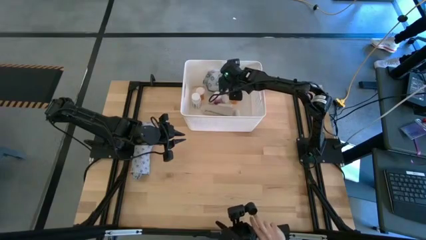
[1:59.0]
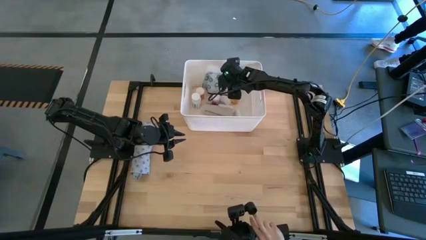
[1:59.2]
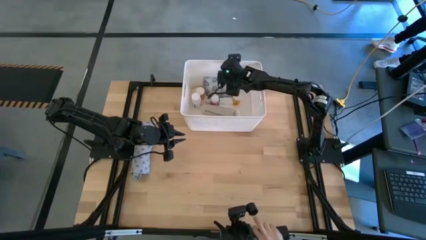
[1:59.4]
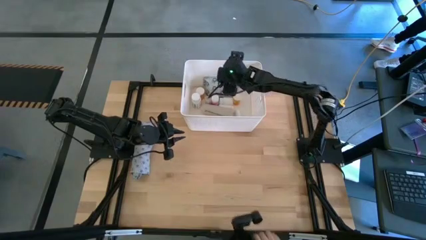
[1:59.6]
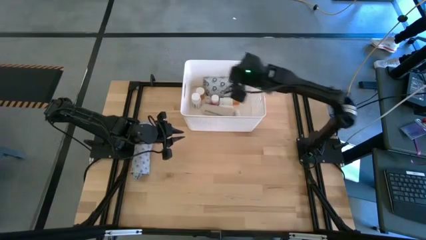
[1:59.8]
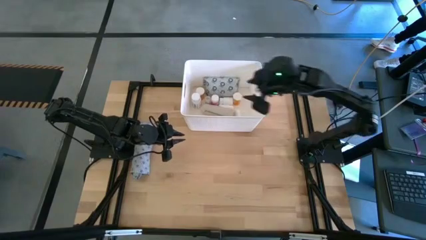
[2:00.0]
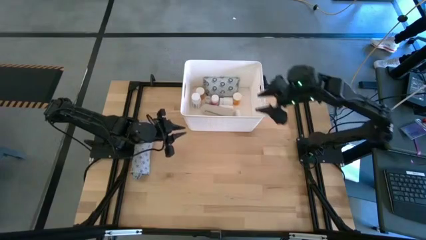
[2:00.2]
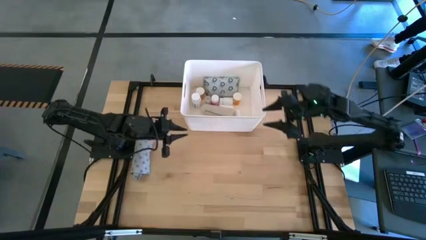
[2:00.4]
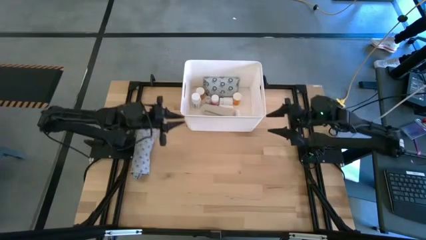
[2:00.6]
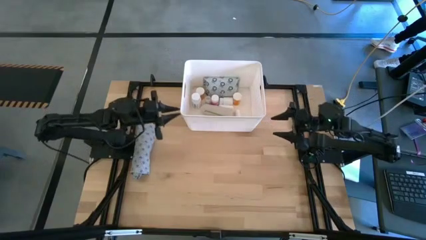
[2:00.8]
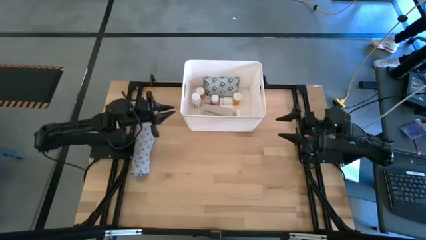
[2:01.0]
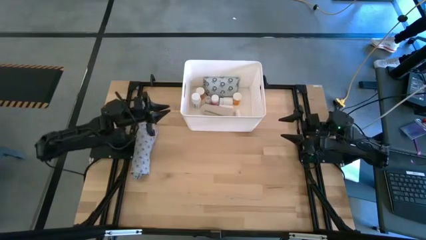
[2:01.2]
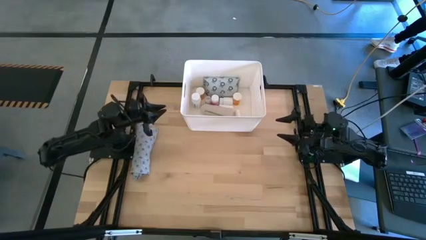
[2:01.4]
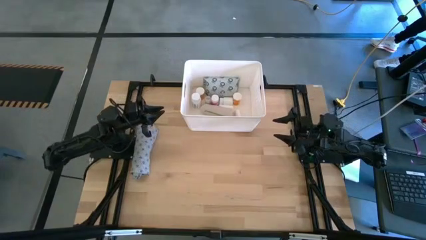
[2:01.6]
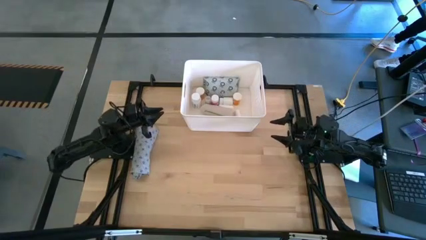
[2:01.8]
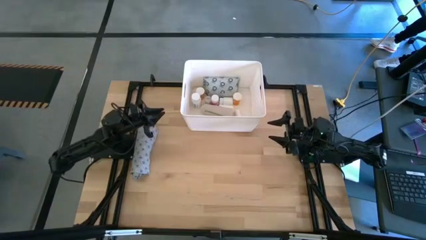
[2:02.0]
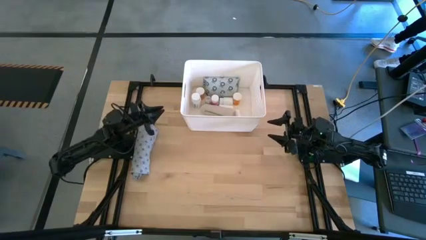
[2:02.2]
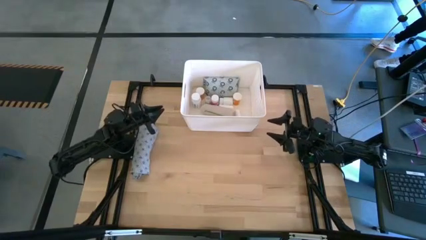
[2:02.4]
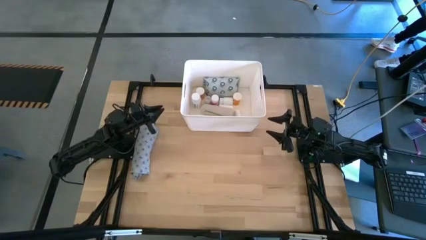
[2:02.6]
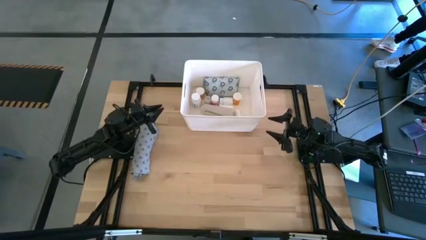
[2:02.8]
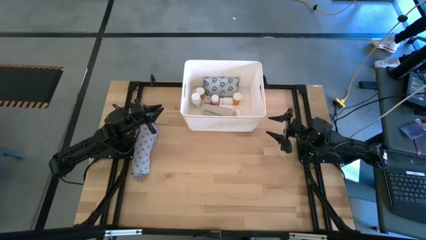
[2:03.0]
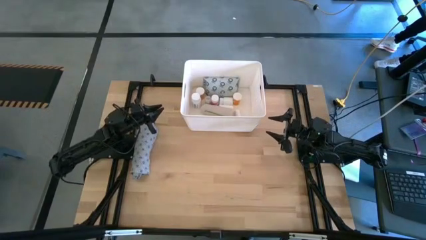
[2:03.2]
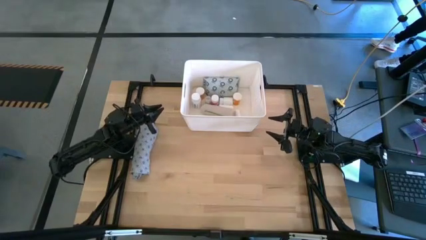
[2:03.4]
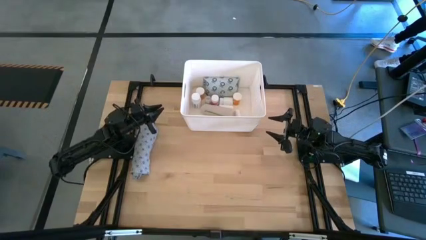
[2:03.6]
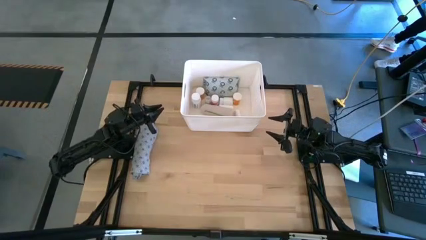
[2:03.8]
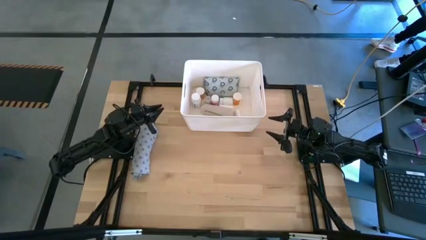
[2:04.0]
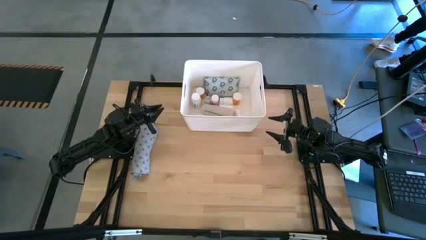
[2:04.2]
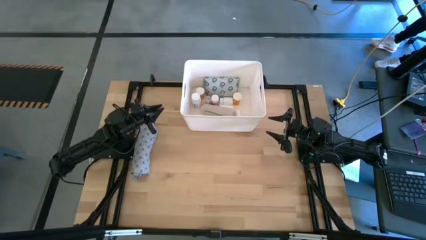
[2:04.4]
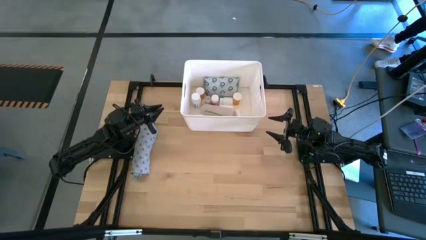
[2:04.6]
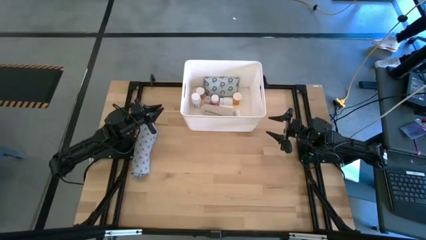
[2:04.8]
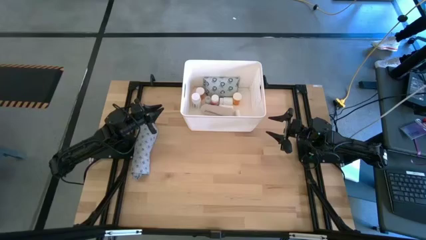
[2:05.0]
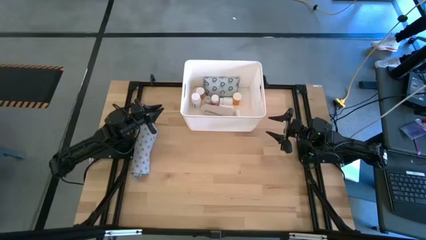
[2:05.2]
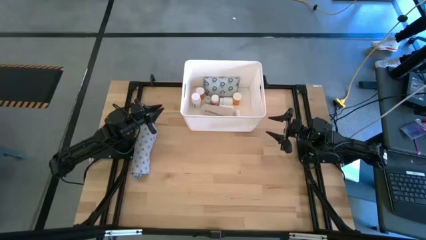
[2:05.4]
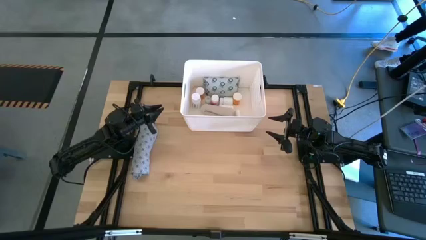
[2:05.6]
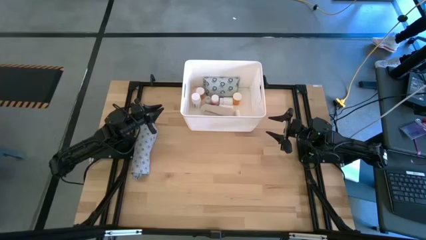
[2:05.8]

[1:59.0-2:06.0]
Task: Pick & place medical supplies in basket/bin
Return to Home Position

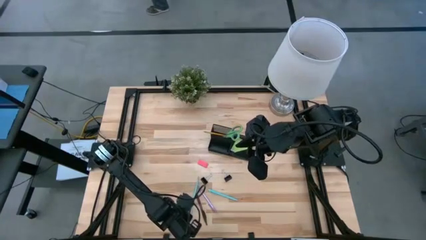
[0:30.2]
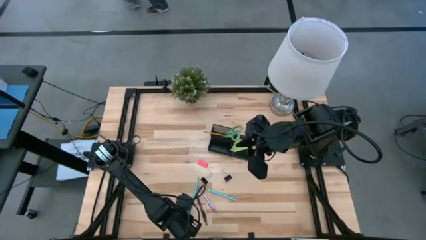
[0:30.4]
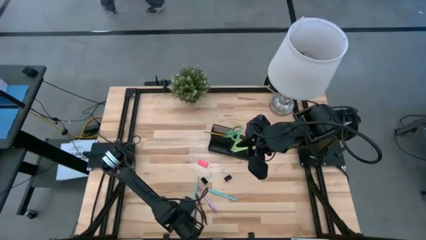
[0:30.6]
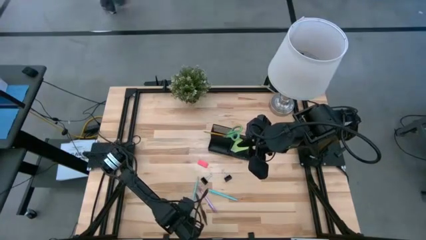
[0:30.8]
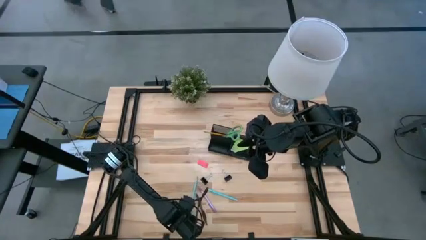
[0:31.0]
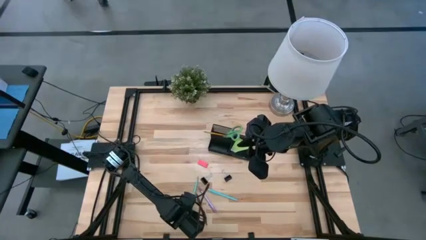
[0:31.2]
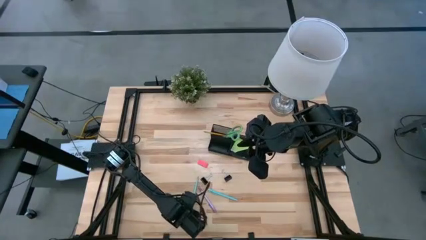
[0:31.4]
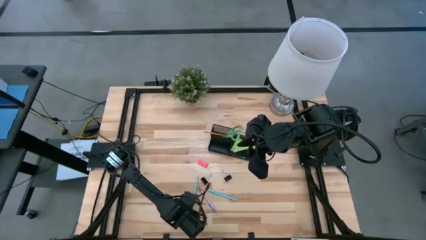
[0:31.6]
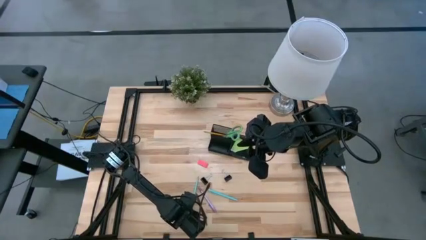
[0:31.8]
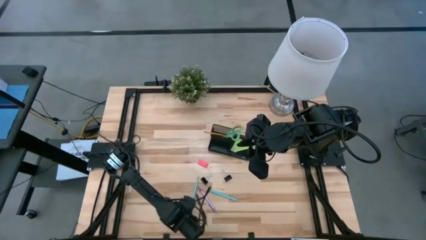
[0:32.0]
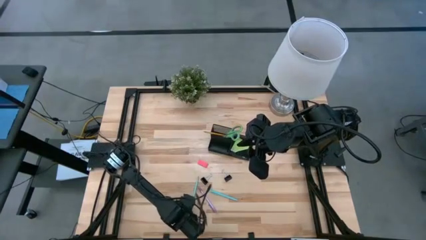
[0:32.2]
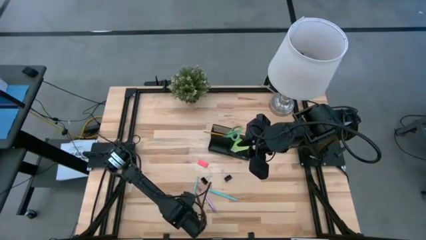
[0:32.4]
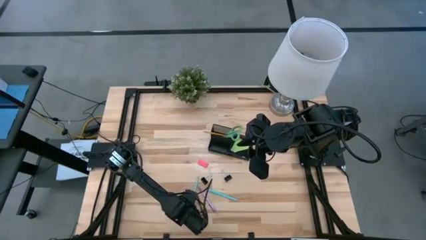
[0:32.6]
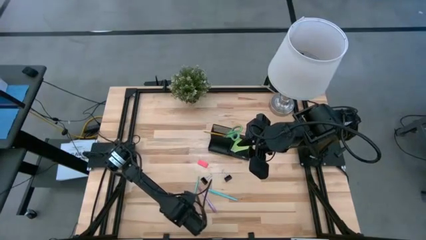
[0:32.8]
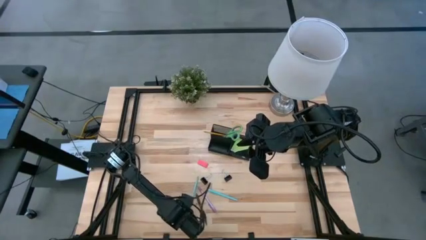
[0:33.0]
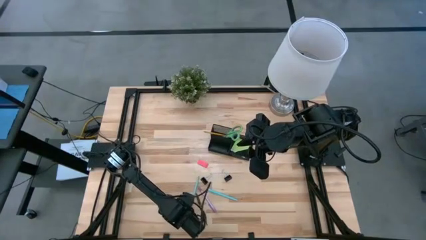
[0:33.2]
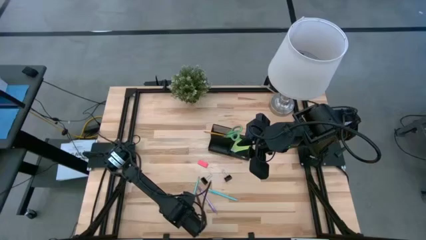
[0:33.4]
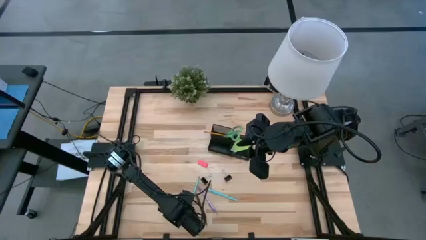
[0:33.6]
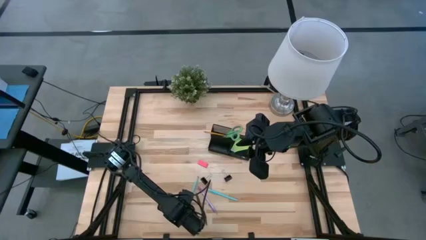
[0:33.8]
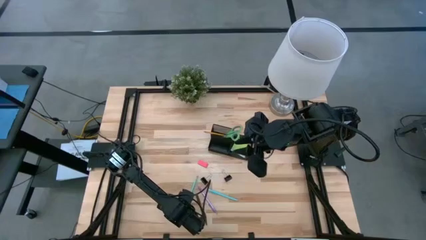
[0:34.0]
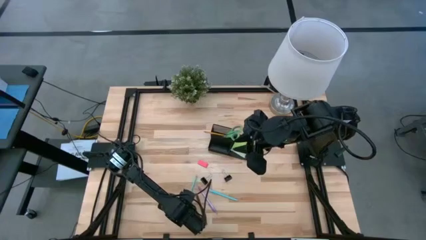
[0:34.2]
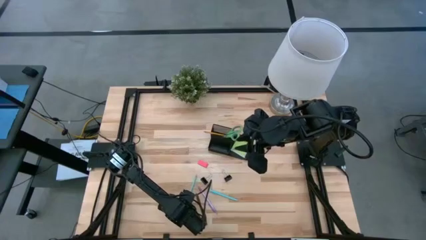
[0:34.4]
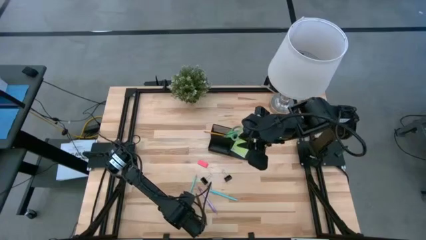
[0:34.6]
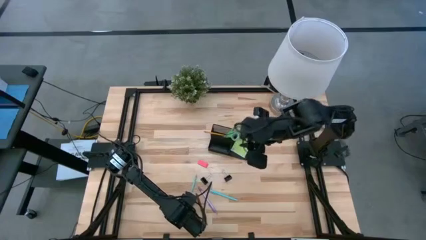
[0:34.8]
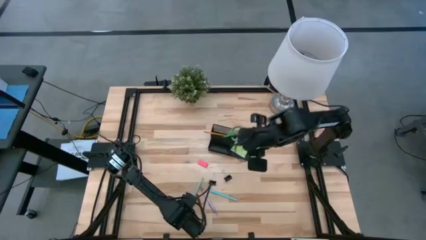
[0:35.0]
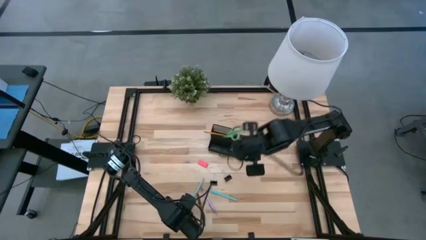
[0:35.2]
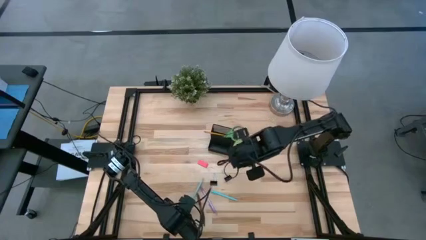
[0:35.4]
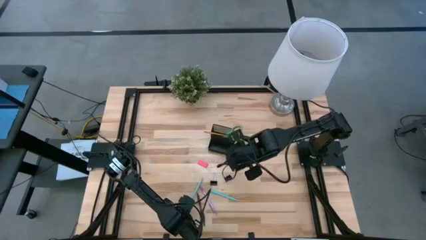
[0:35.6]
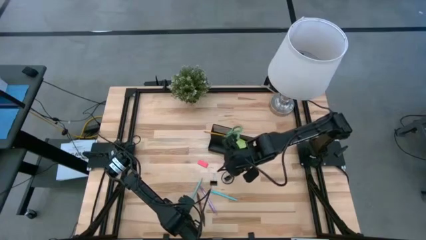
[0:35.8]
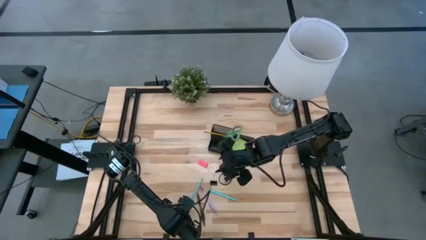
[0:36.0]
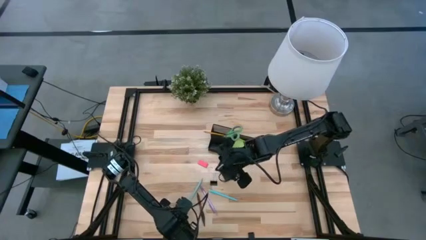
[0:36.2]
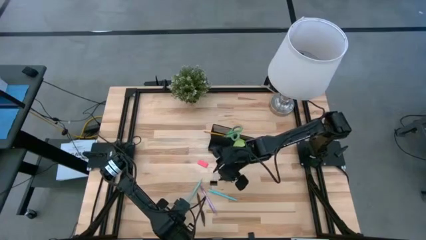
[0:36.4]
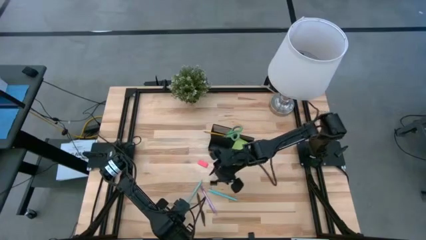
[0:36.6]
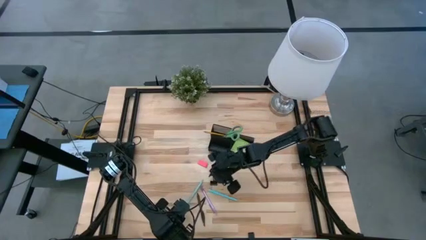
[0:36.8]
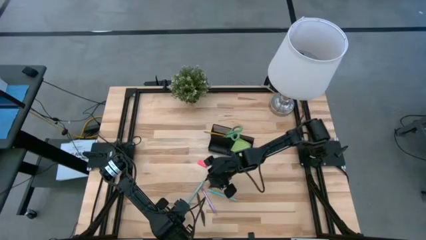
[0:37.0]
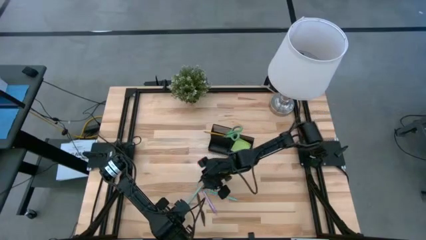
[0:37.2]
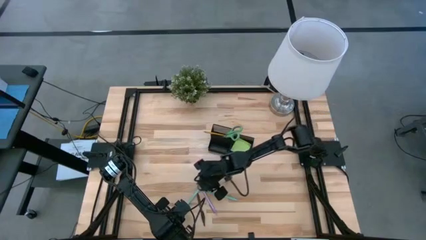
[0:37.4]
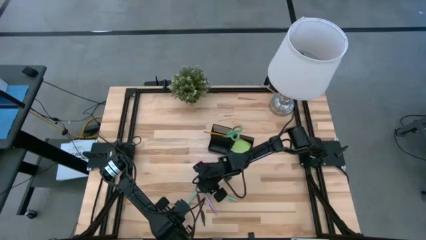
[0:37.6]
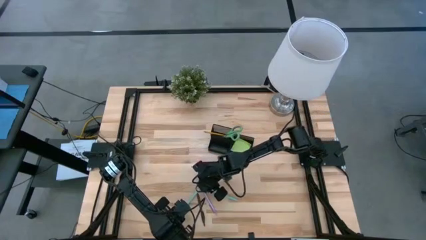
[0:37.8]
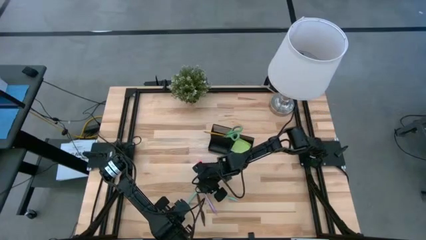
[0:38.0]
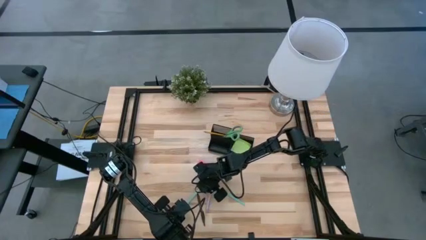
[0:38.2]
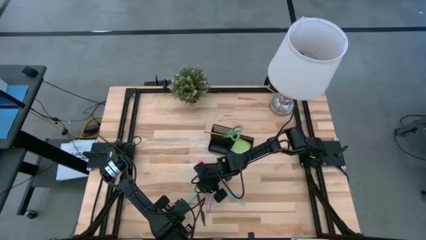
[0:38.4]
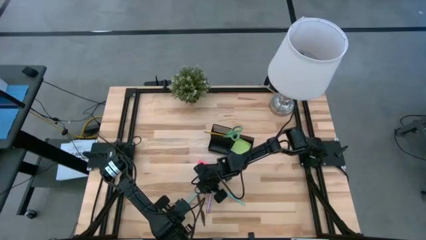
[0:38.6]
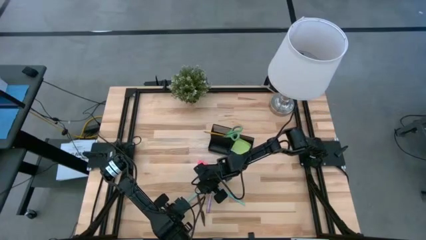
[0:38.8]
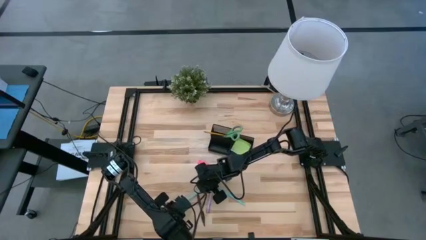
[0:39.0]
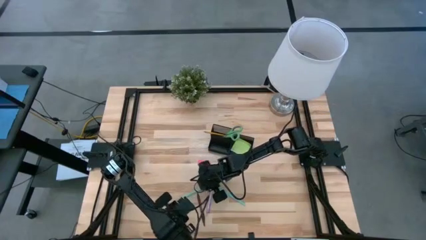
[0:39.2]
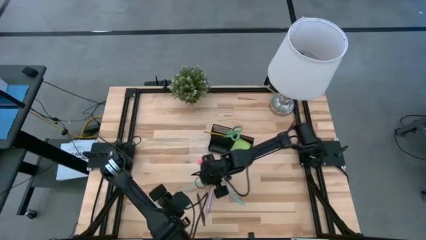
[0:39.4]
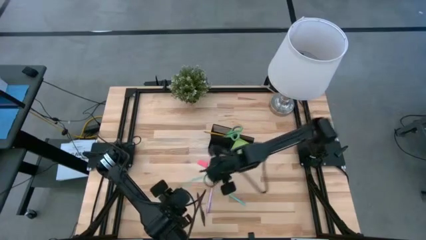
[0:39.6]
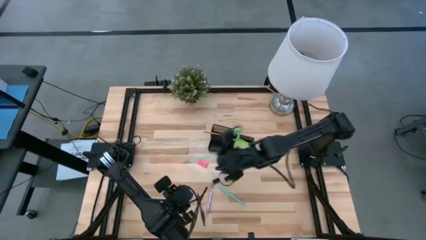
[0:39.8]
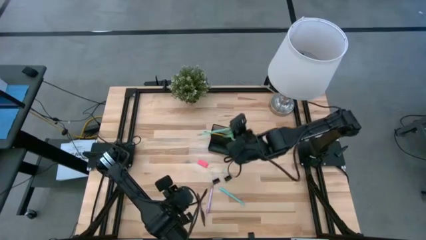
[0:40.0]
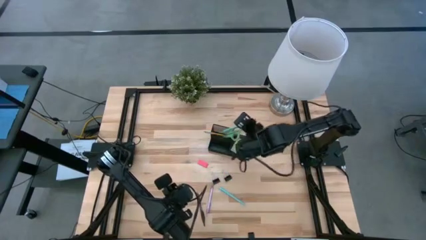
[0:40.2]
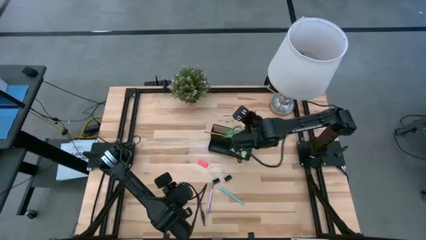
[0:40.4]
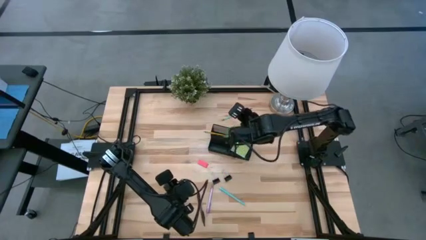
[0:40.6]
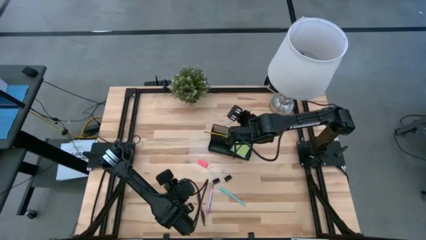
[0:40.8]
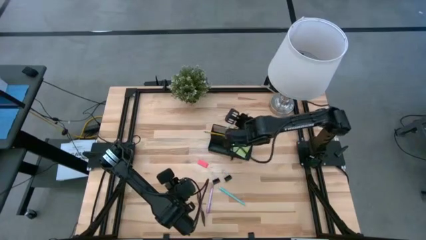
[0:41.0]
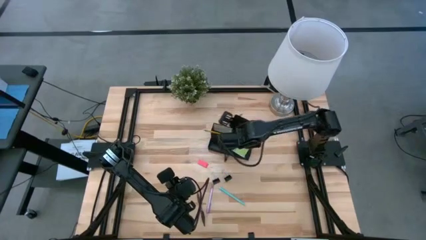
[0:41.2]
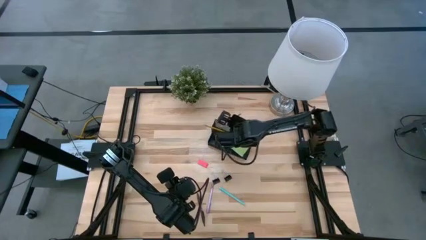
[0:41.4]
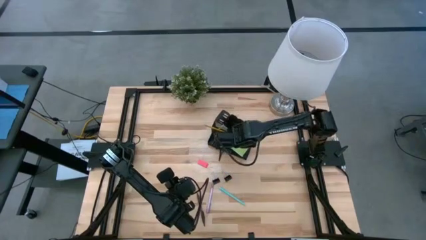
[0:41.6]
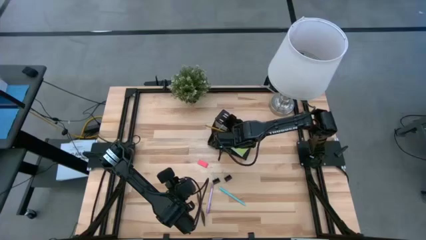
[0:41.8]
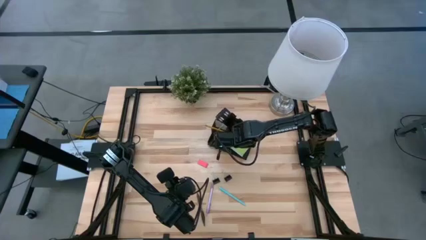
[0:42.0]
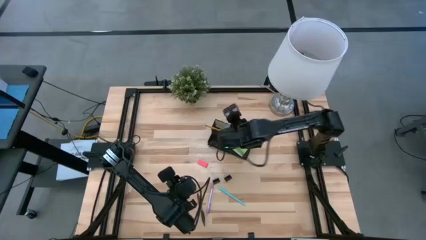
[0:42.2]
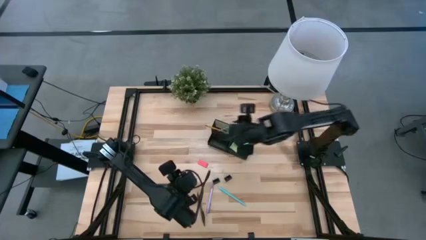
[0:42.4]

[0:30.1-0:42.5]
Task: Pick and place office supplies into organizer
Put the blue pencil on the black desk organizer
